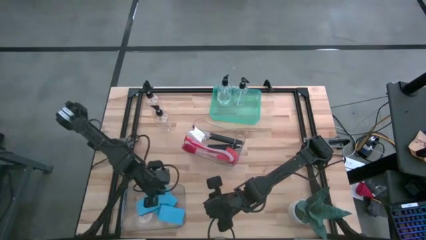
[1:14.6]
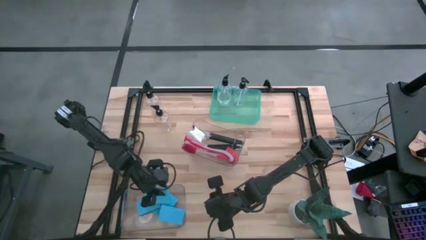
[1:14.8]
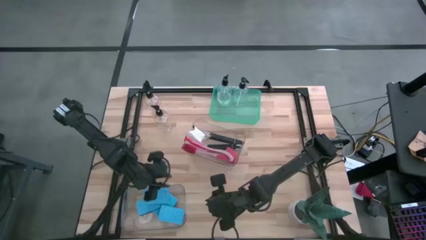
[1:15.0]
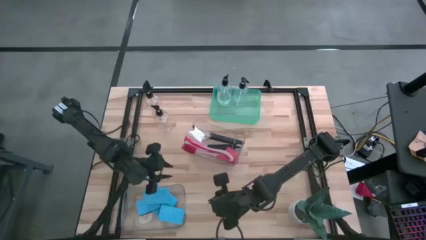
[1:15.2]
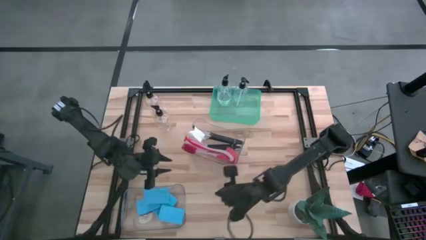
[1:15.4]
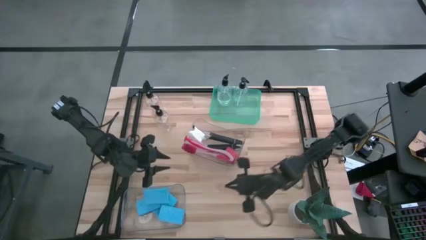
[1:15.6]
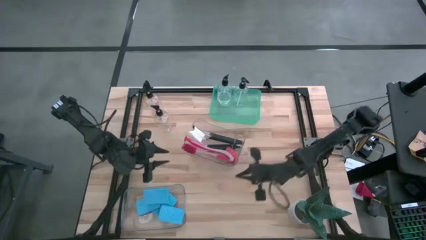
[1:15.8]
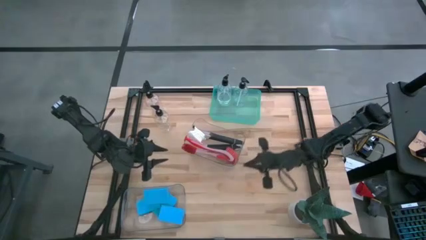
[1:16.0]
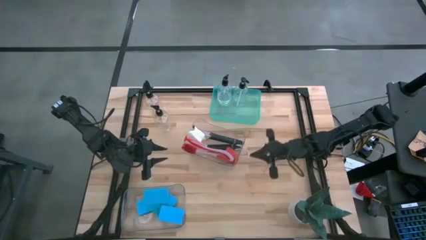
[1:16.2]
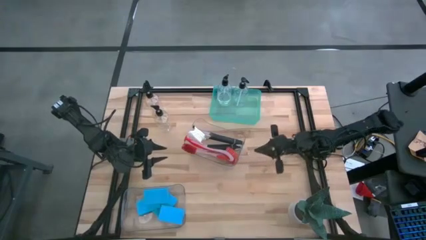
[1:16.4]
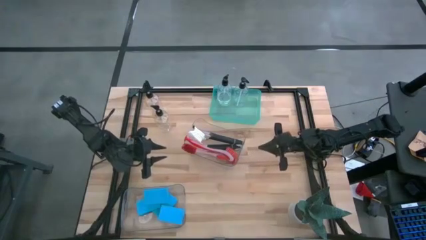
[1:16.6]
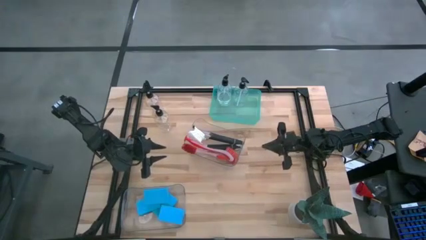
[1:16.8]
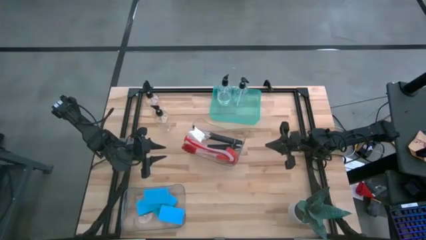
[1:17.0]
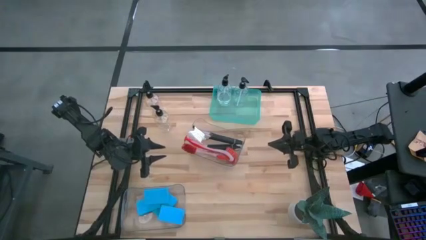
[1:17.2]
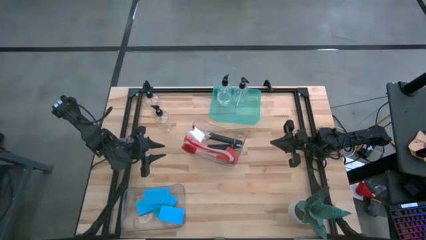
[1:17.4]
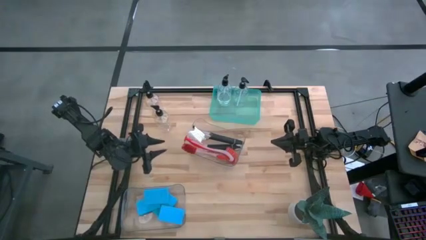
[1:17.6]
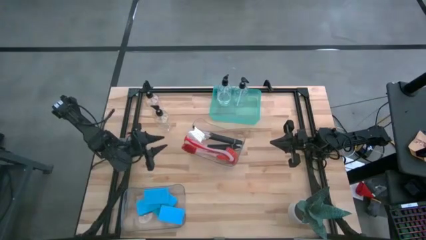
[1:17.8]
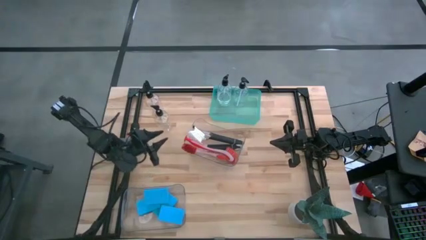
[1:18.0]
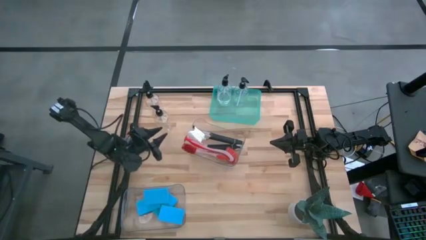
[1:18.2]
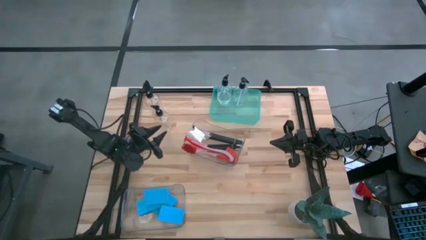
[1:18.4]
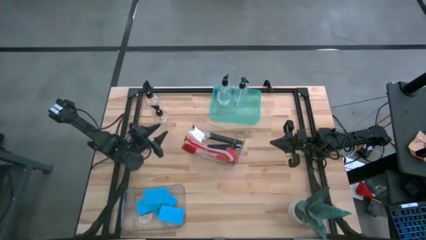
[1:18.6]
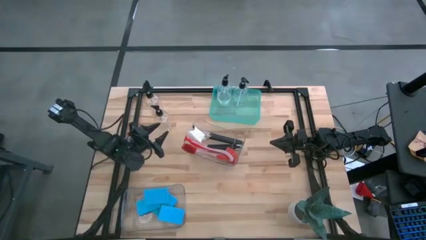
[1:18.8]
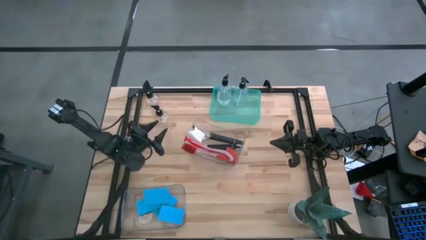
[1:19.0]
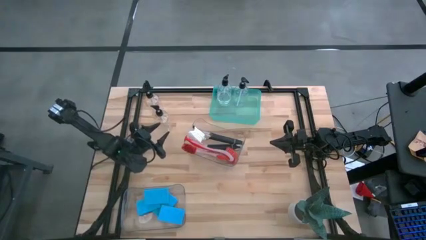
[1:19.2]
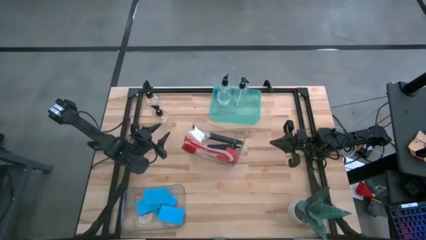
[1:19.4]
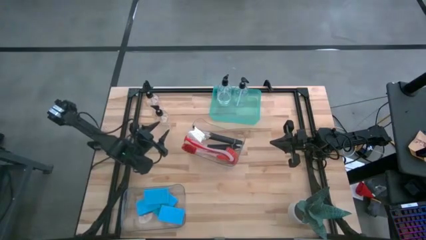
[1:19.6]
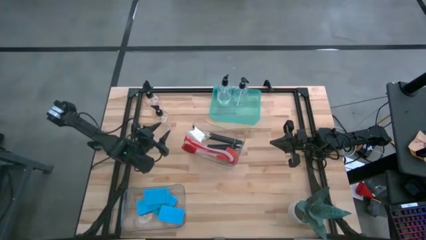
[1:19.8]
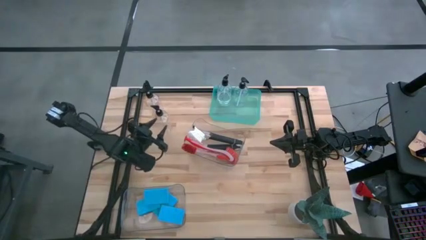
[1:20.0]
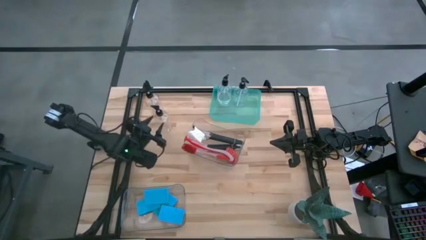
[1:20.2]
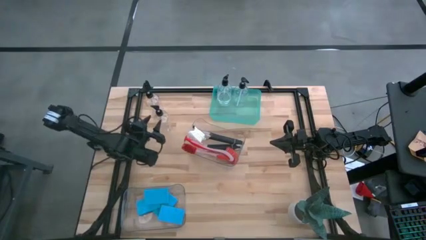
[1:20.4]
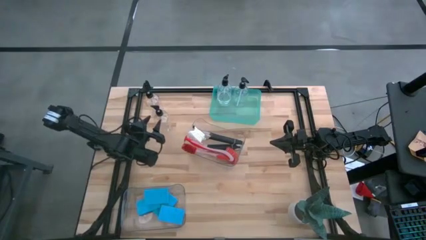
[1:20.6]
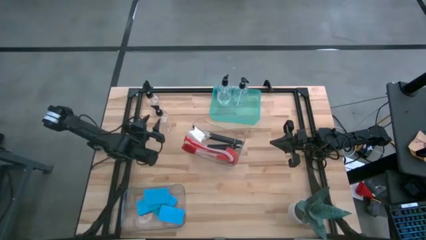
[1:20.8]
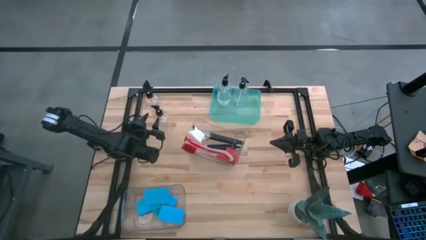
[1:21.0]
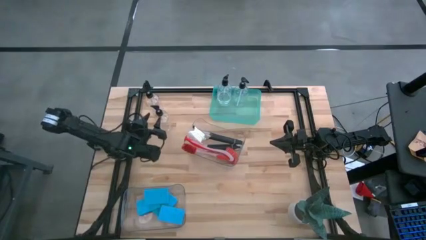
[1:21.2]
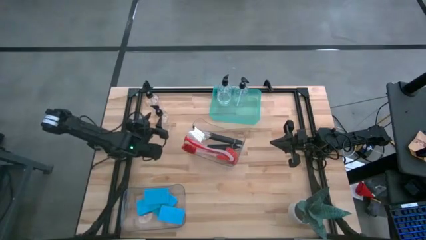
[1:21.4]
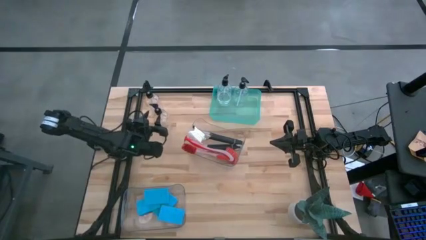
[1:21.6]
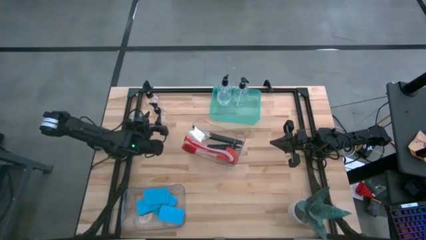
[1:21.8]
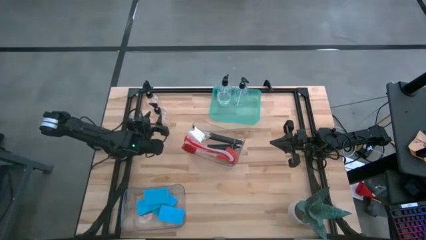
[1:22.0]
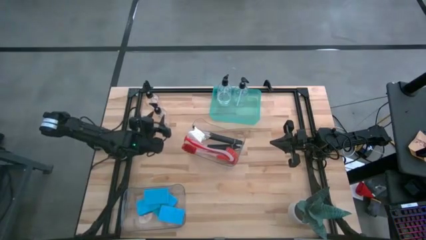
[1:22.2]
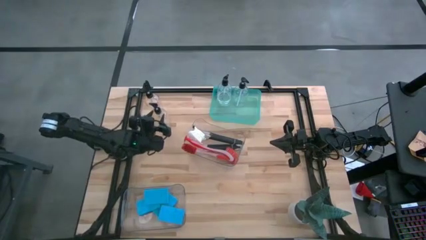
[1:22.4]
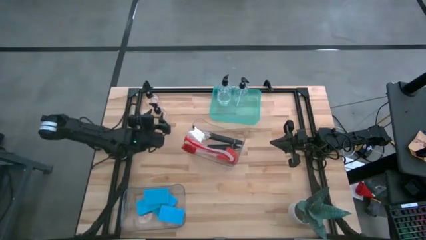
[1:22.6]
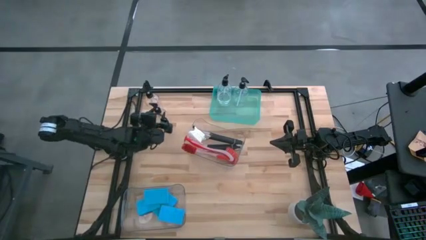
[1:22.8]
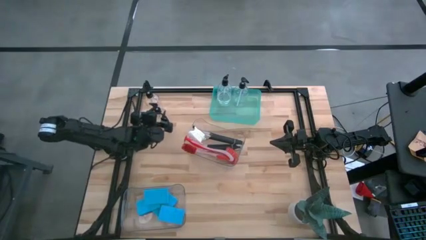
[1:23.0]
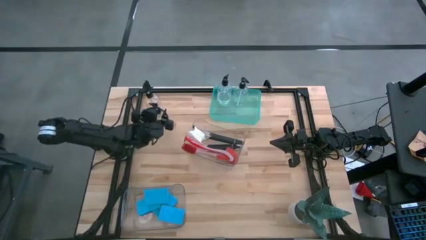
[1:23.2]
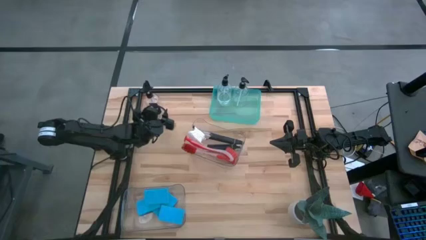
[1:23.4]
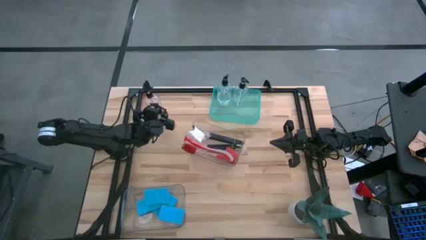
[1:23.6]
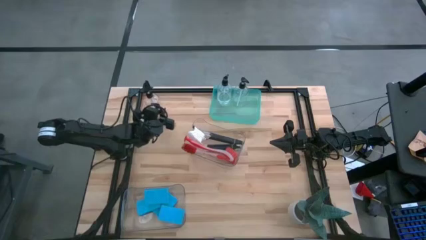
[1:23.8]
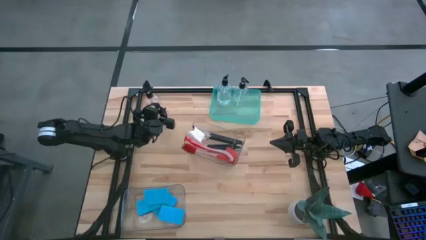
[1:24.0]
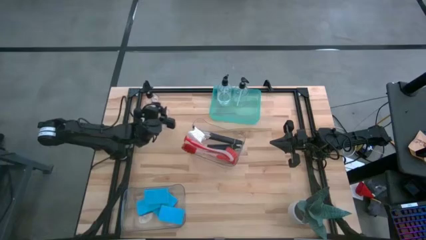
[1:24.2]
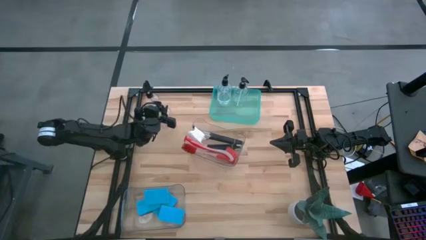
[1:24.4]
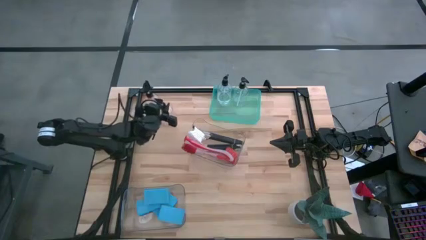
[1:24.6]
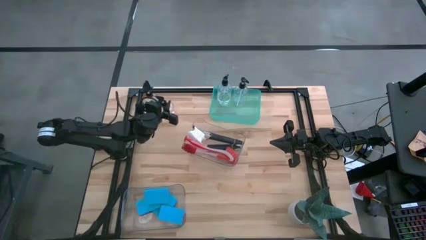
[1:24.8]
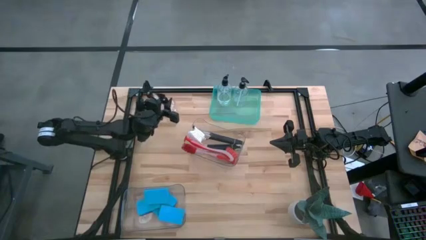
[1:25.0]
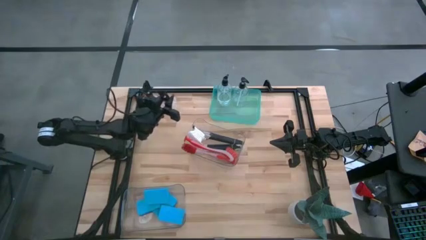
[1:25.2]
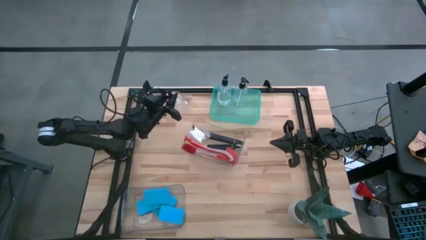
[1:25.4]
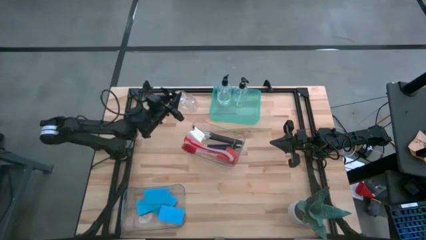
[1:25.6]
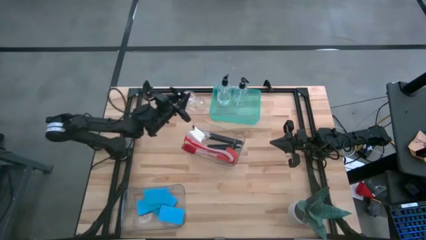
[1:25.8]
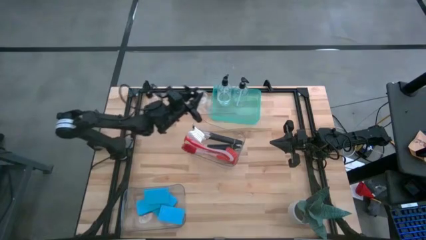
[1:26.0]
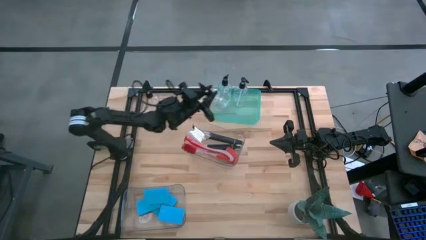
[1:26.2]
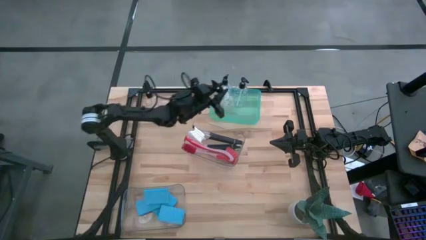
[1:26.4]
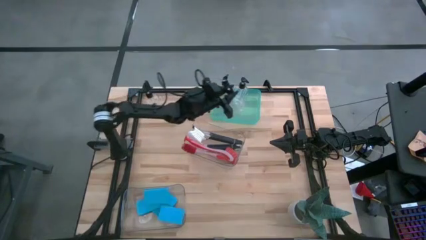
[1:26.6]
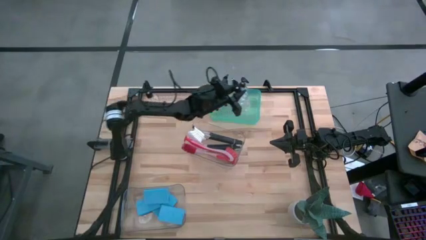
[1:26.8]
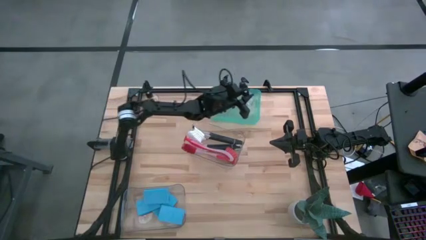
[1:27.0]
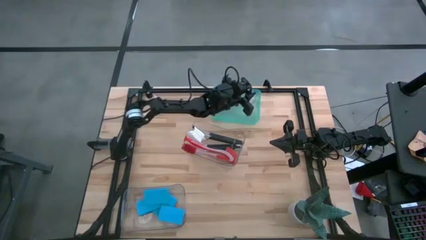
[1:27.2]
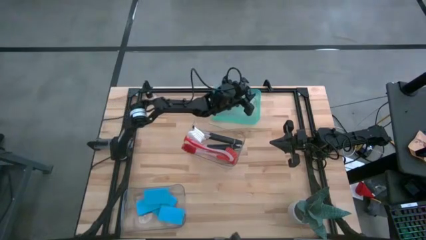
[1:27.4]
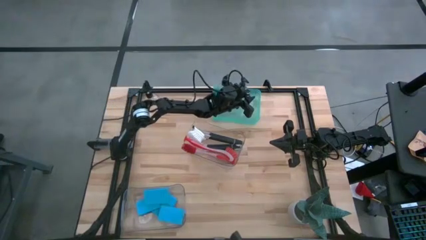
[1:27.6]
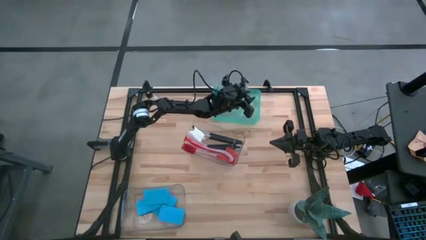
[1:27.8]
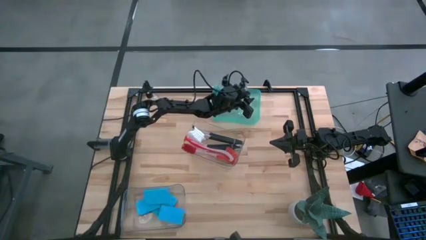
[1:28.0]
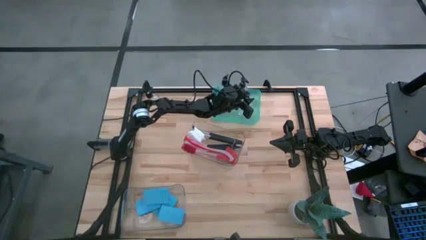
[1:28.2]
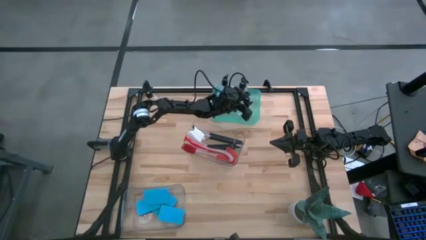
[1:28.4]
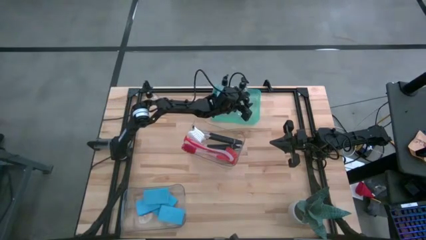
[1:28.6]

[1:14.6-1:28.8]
Task: Pick & Place Kitchen Sink Supplies
Put the transparent soap dispenser into the green bin

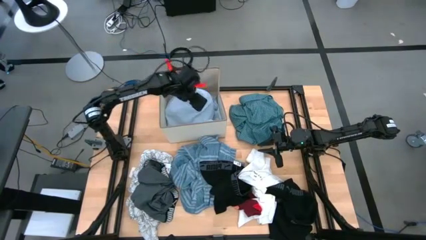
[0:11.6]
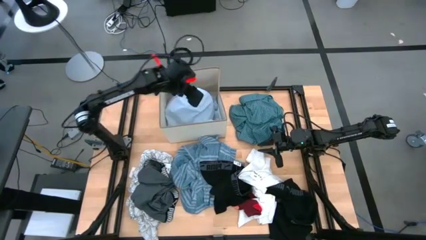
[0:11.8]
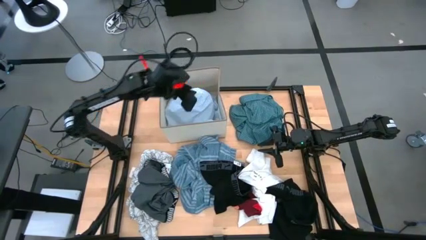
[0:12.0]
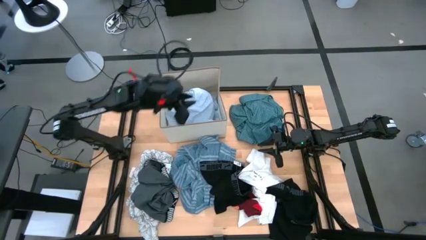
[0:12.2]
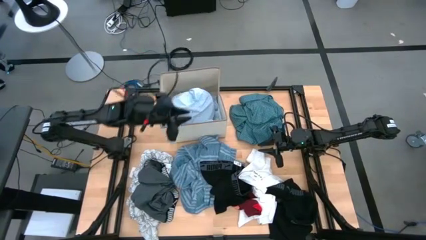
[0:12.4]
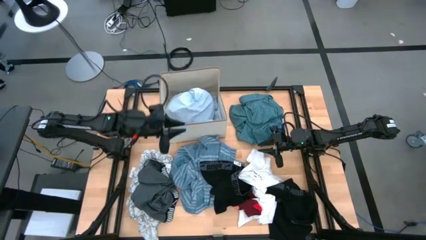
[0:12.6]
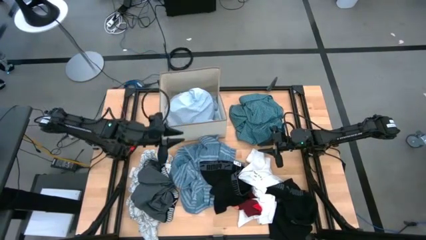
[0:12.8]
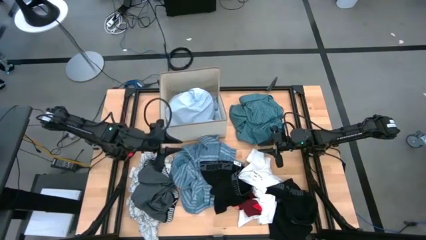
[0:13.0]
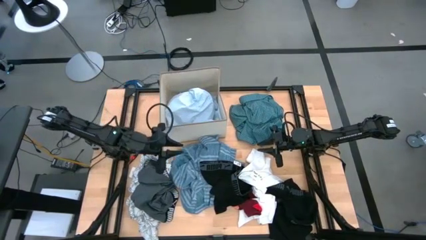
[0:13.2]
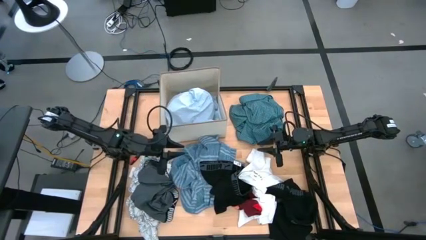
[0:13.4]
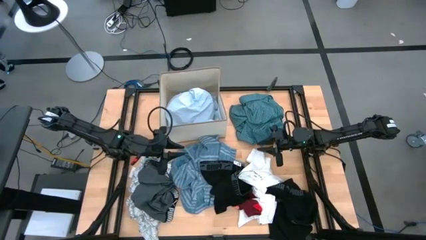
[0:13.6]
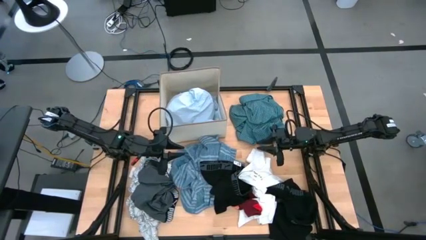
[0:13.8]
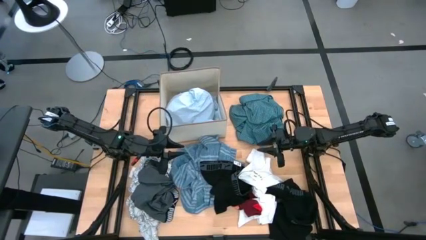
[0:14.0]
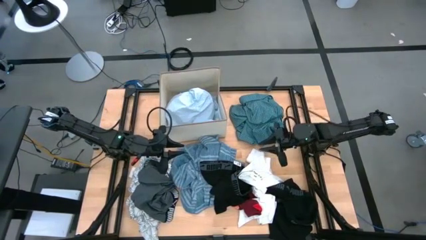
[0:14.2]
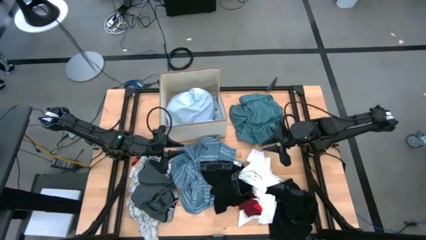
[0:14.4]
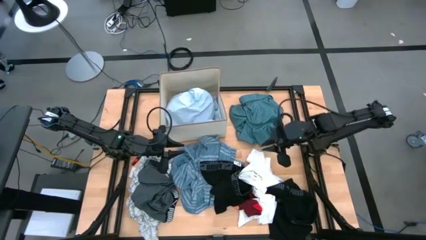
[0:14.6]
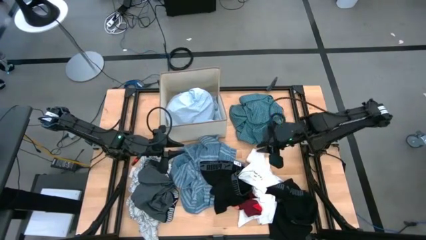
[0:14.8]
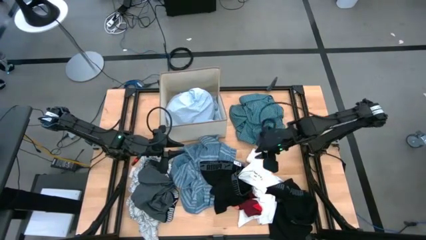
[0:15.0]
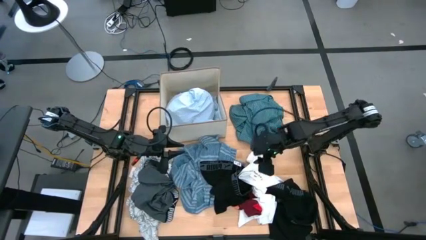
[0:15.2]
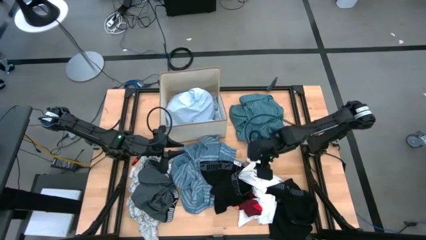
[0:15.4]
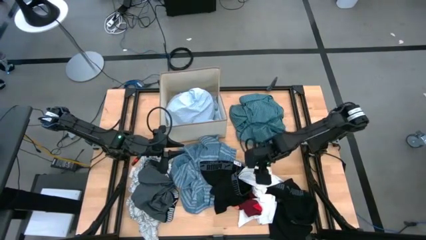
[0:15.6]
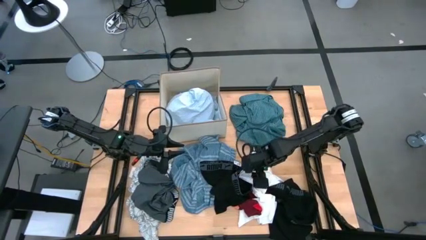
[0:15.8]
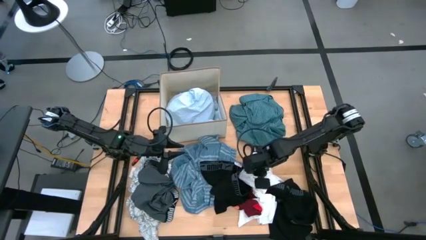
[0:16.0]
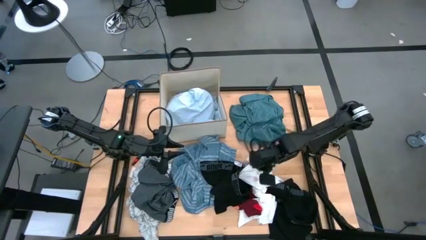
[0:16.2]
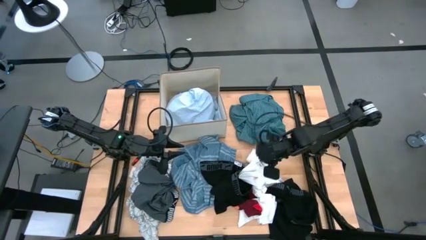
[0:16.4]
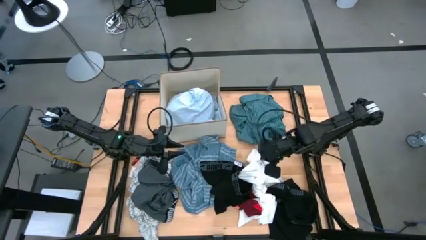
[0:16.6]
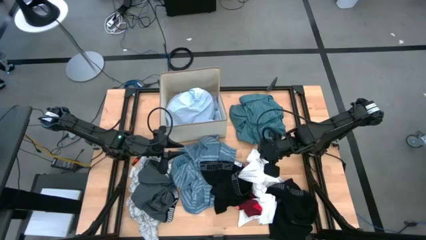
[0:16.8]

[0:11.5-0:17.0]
Task: Sort clothes
Put the white underwear into the white laundry organizer
